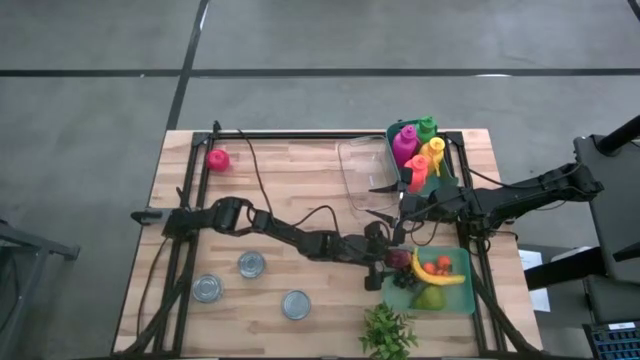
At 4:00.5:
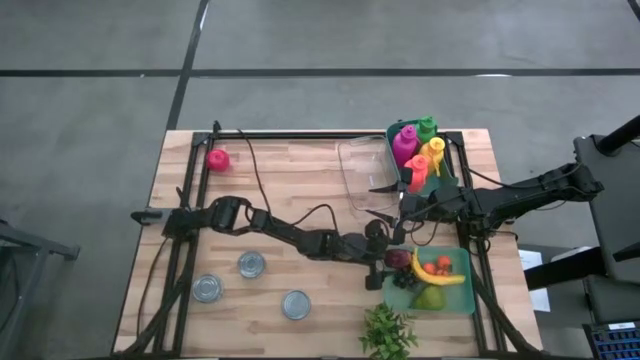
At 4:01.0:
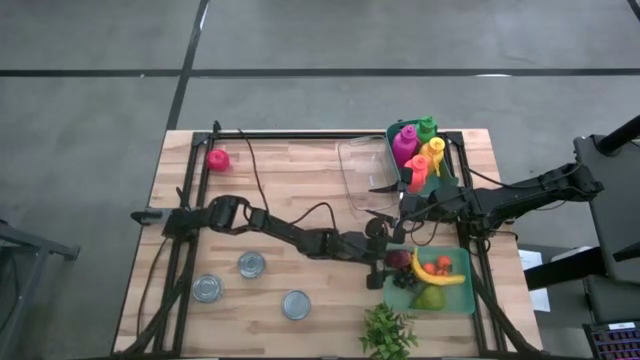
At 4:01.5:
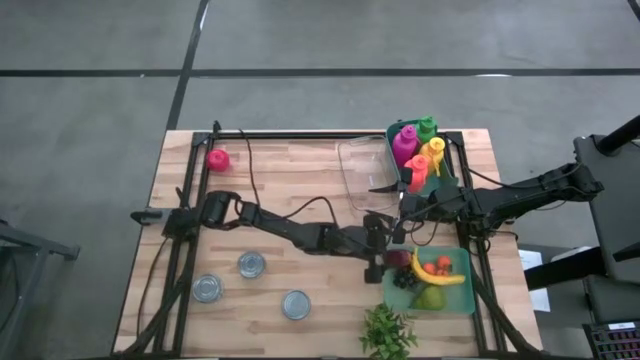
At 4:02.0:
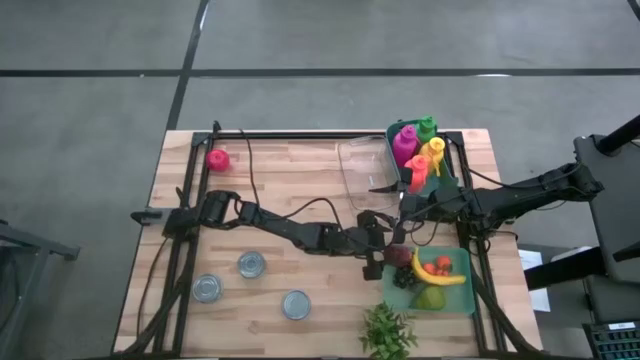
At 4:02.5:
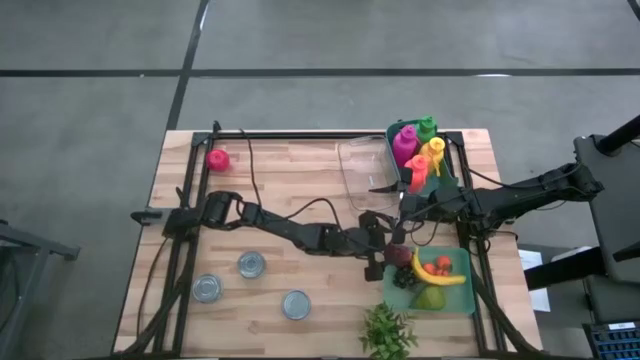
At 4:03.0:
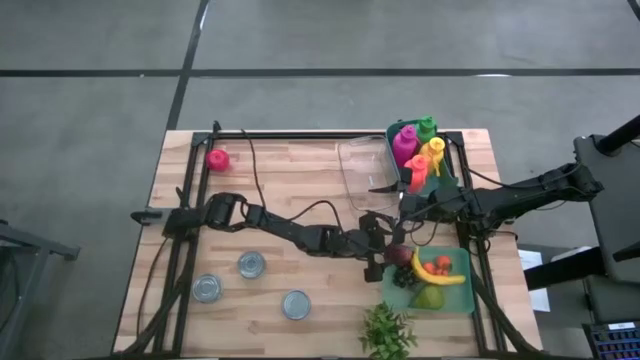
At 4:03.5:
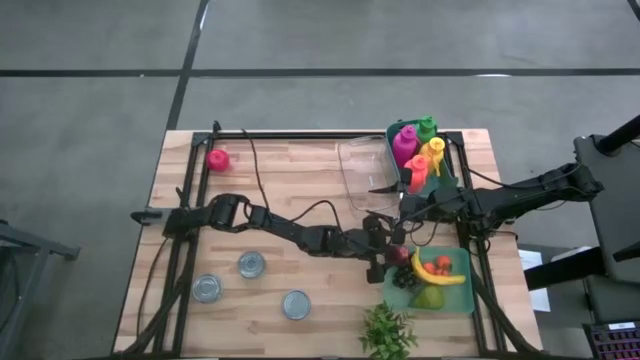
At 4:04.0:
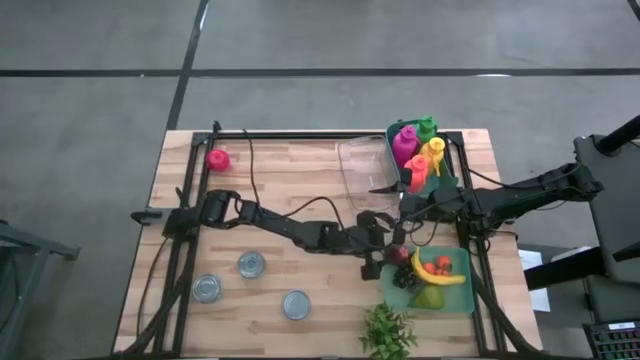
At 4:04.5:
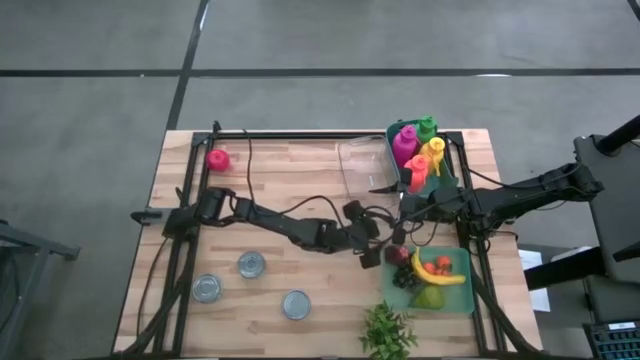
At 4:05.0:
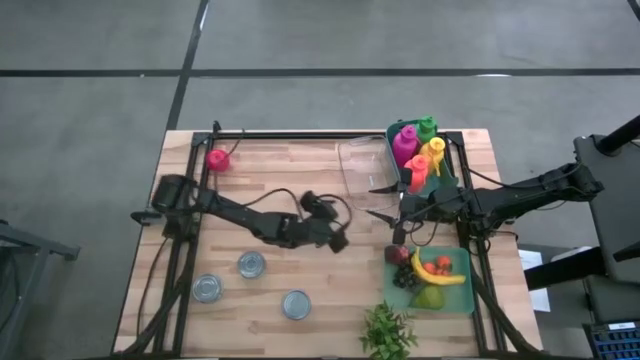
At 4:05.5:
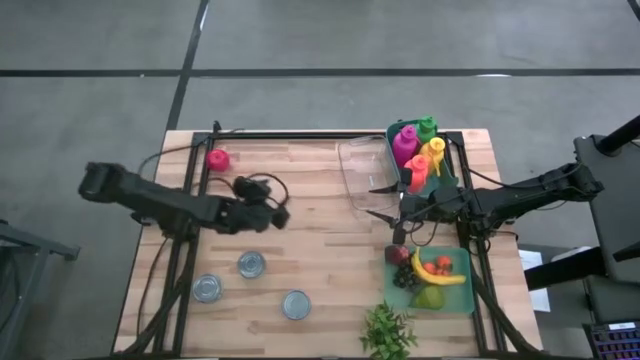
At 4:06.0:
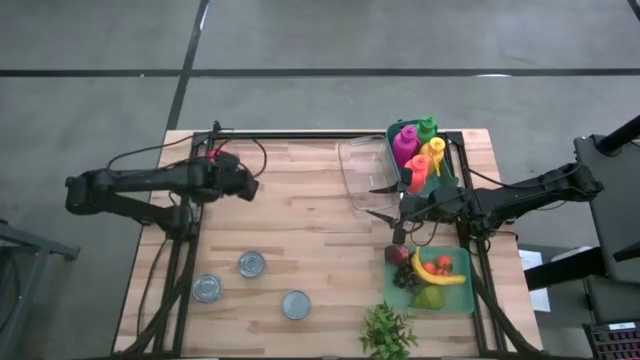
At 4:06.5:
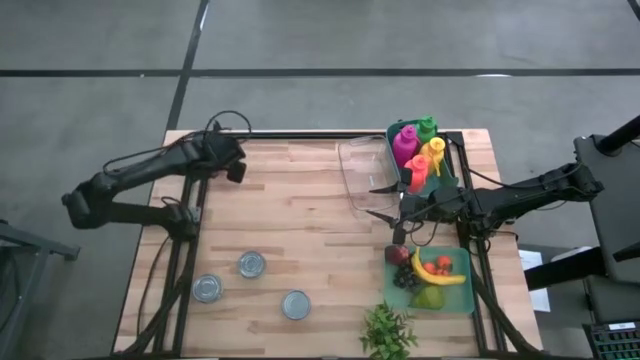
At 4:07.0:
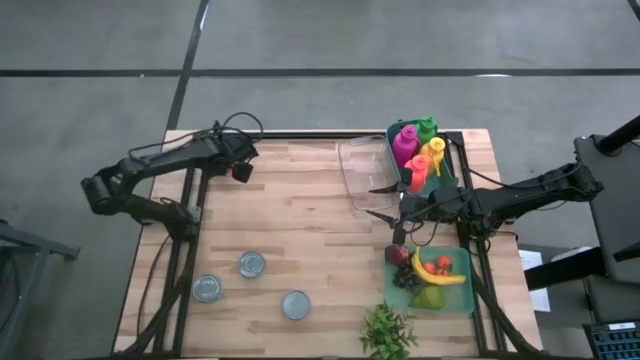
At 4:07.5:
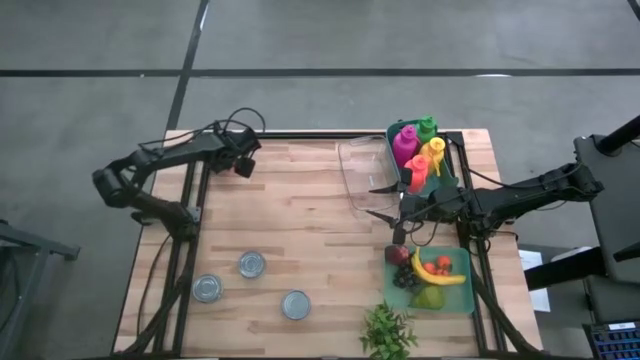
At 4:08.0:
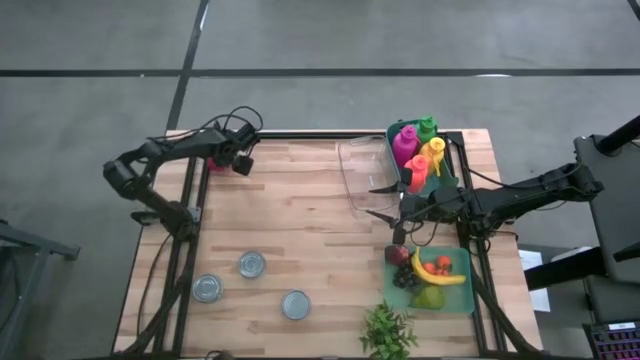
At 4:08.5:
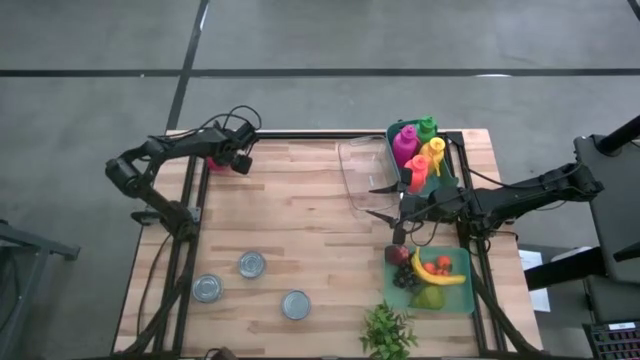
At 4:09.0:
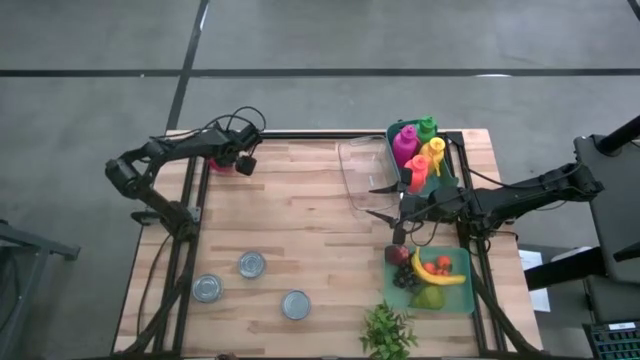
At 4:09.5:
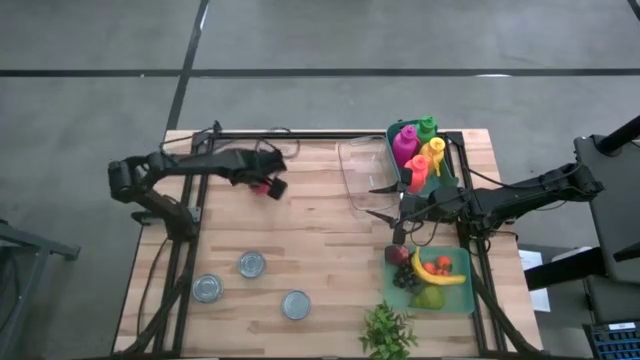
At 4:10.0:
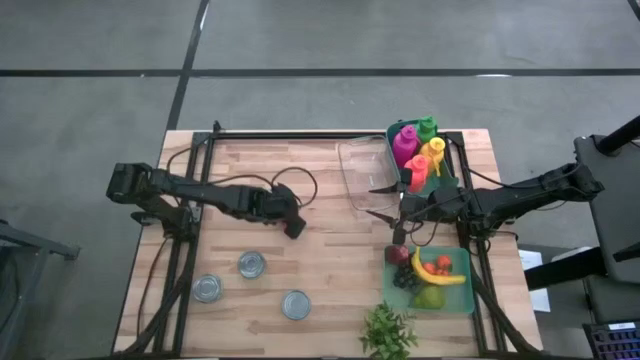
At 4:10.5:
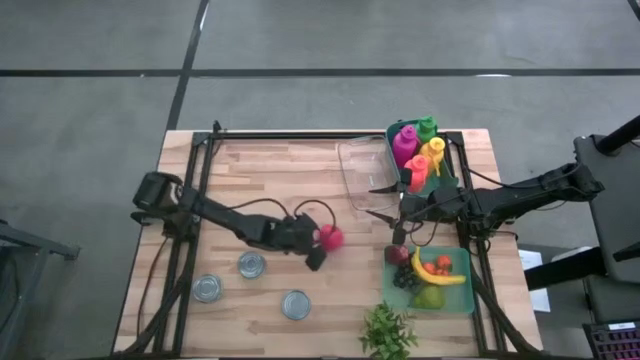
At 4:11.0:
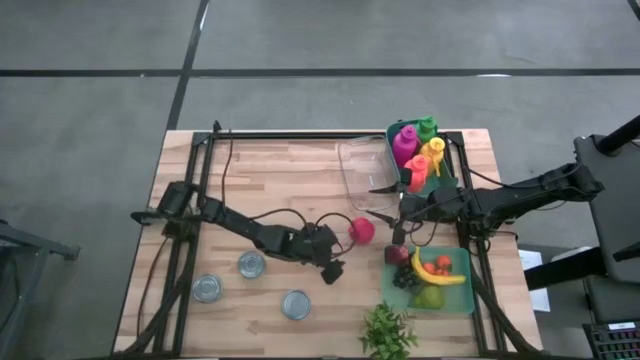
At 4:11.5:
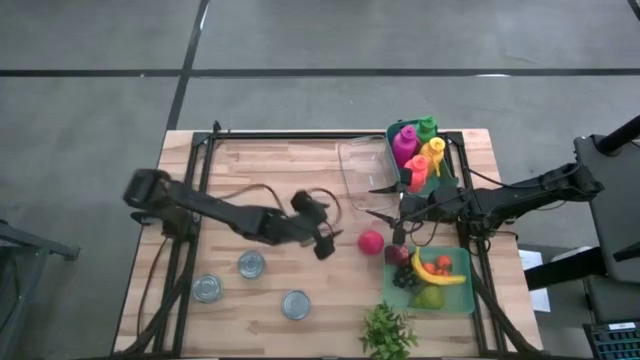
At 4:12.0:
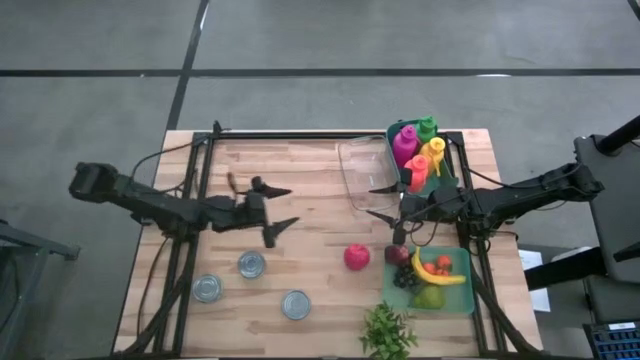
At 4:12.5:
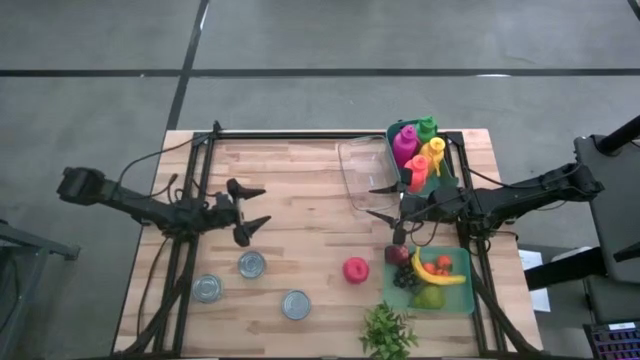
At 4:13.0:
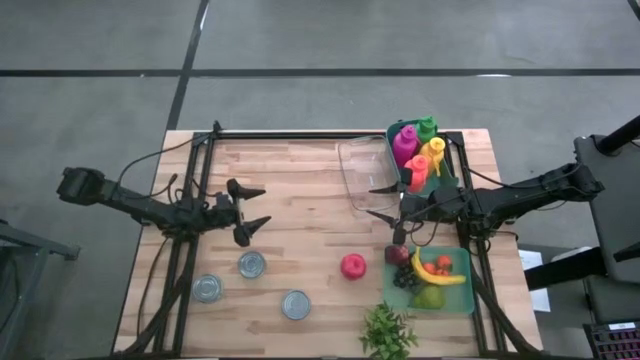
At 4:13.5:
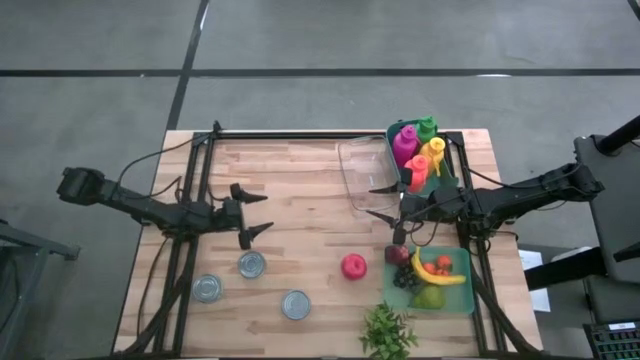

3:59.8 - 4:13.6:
Task: Pick & Place Food Item
Put the red apple into the green transparent bin

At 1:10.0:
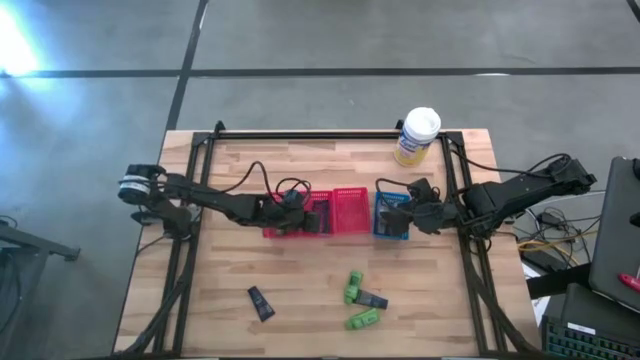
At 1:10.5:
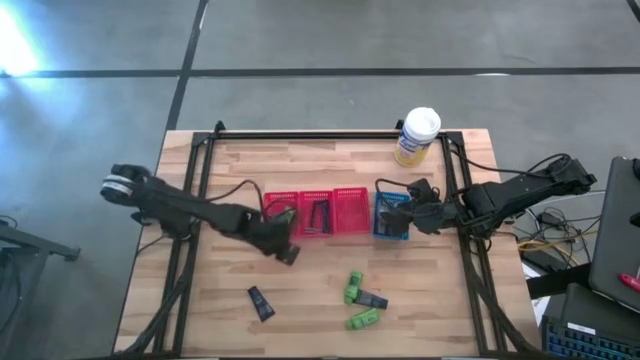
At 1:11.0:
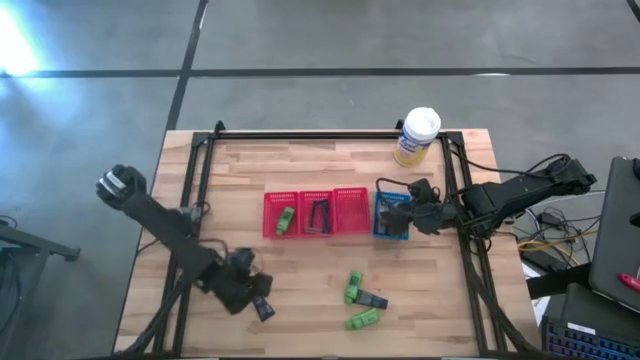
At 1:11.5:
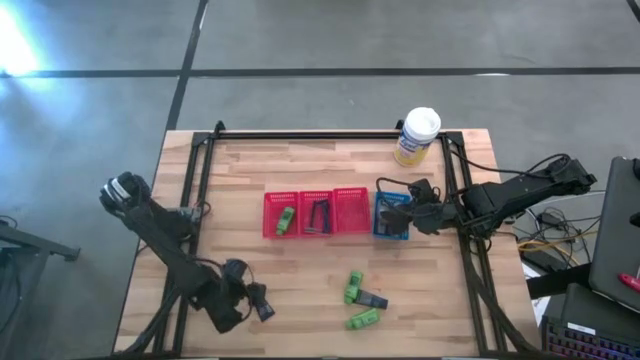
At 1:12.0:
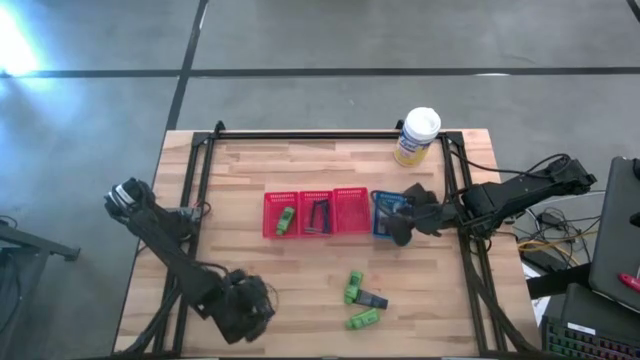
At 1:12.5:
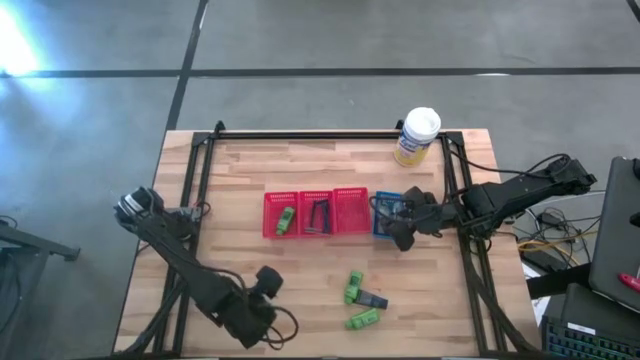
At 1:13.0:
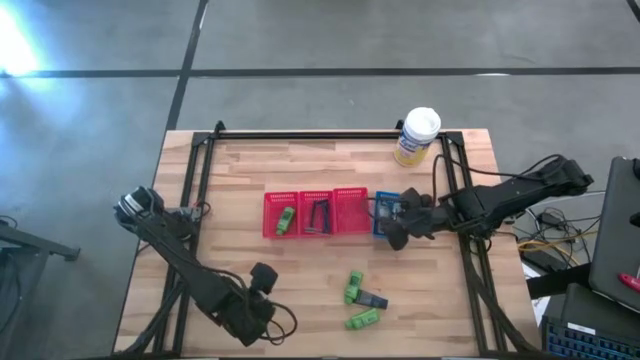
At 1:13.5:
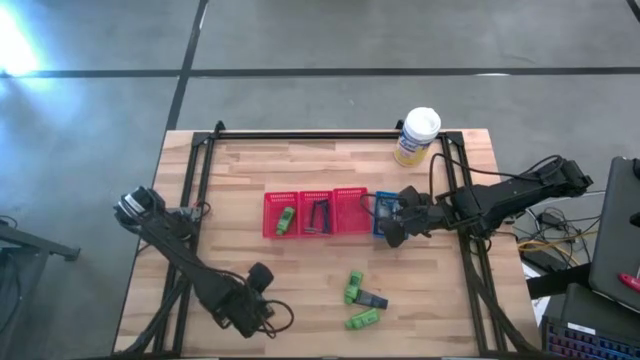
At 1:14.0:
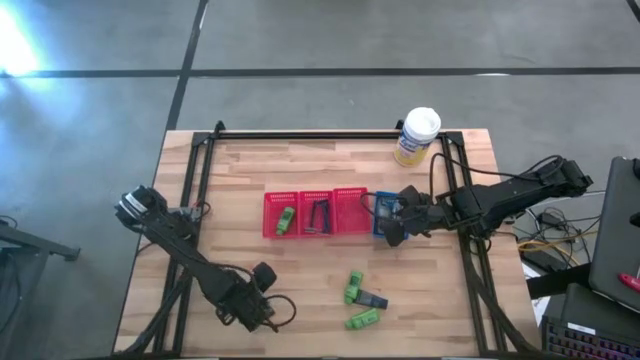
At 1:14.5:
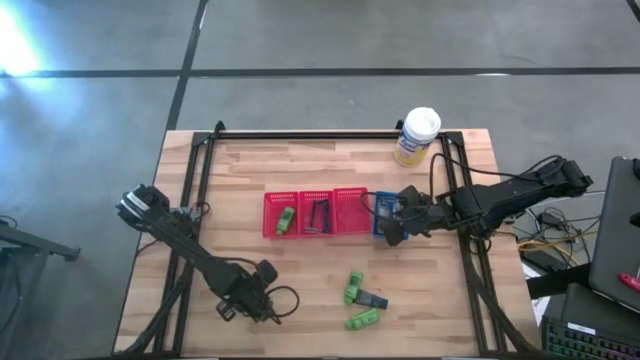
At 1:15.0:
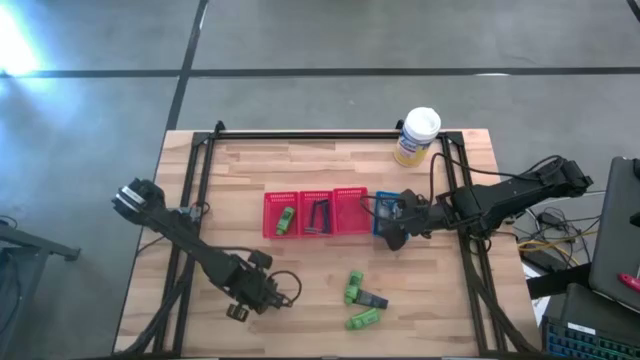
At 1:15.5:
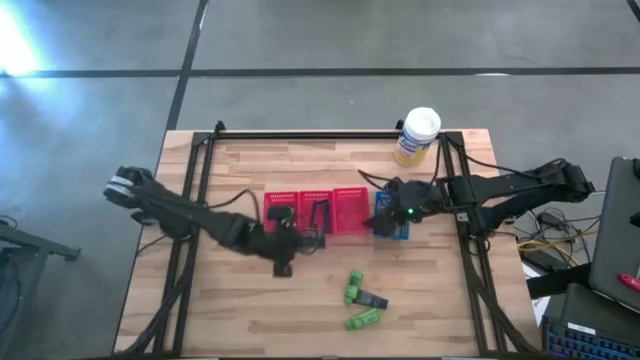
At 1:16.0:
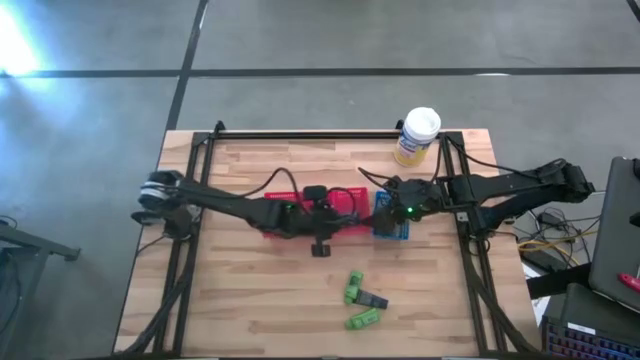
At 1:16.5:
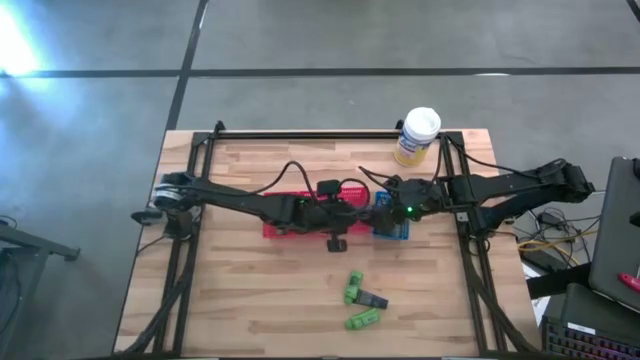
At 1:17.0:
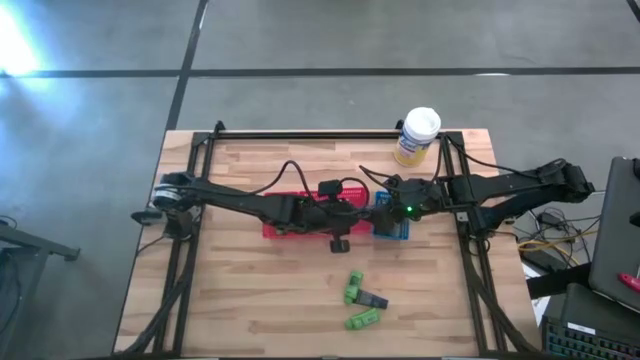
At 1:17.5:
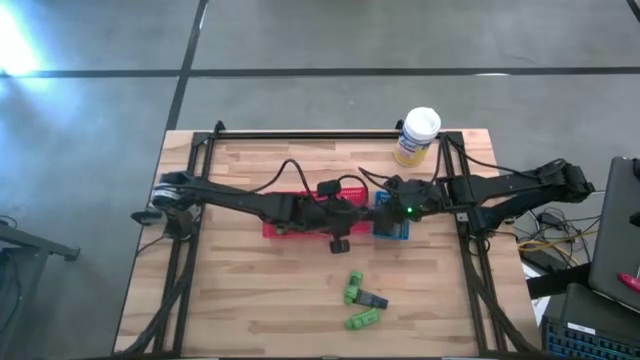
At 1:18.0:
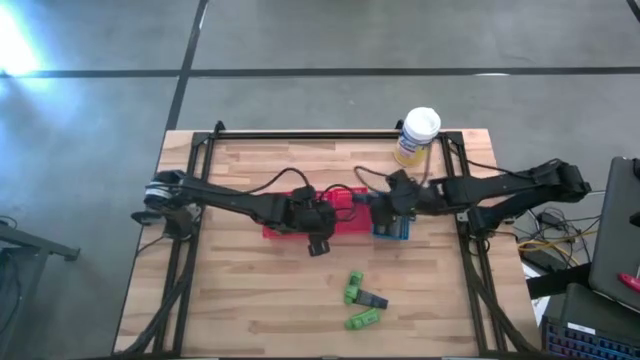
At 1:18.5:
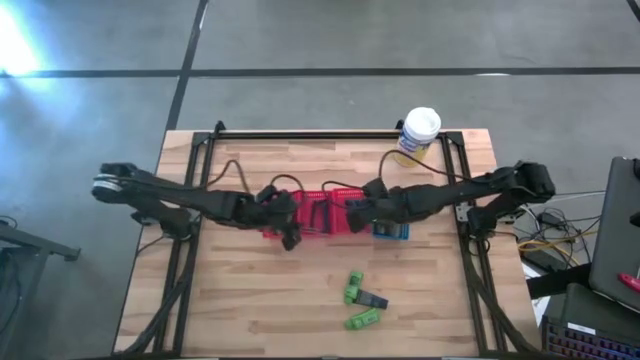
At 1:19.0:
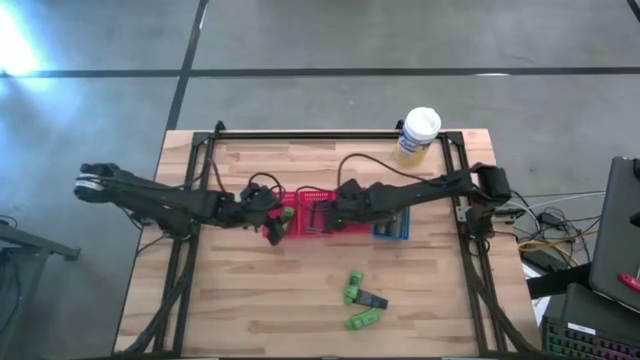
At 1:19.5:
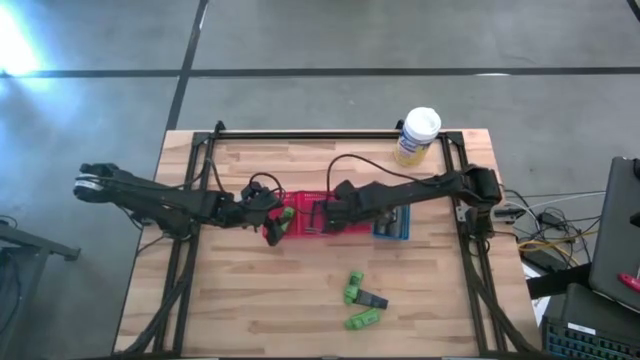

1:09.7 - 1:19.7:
Task: Pick & Place Travel size toiletries
Put the blue shave cream into the right red bin
